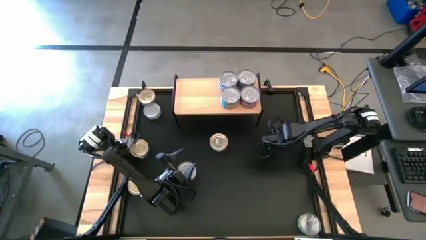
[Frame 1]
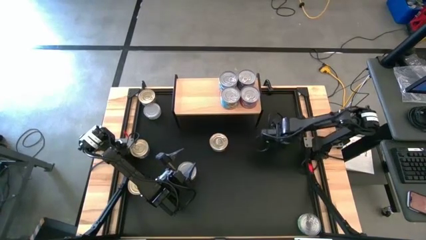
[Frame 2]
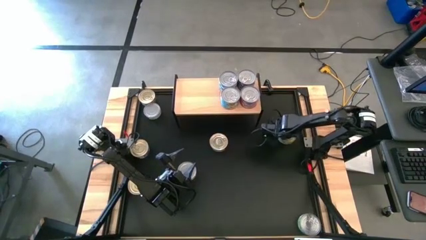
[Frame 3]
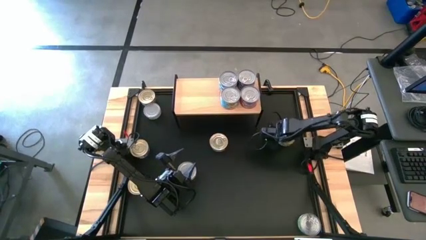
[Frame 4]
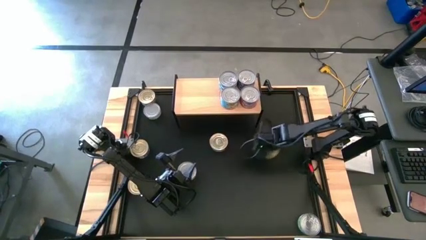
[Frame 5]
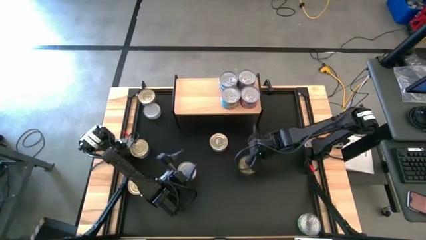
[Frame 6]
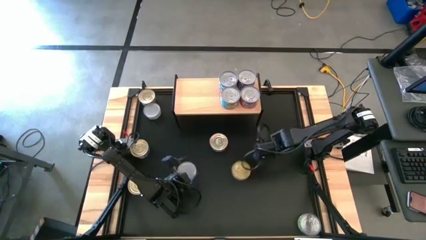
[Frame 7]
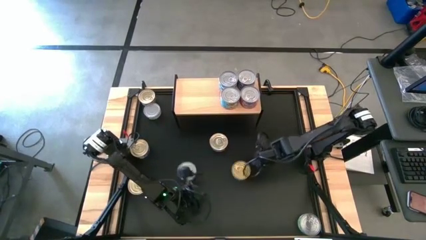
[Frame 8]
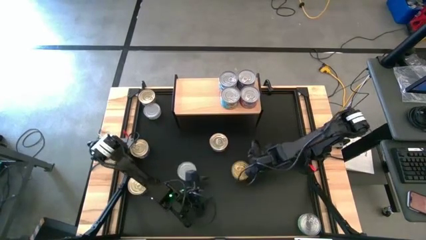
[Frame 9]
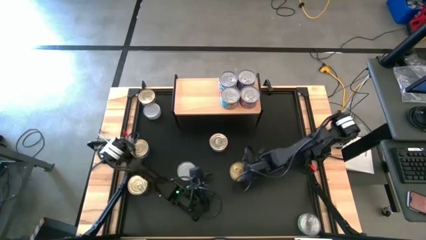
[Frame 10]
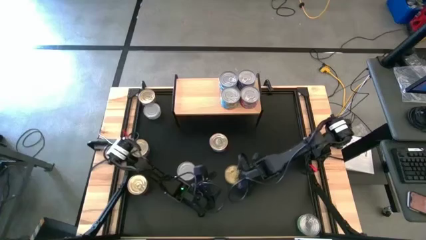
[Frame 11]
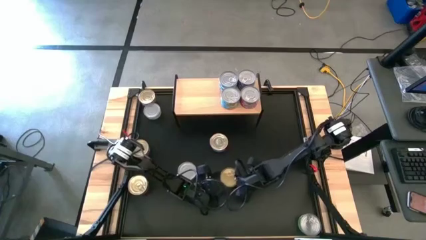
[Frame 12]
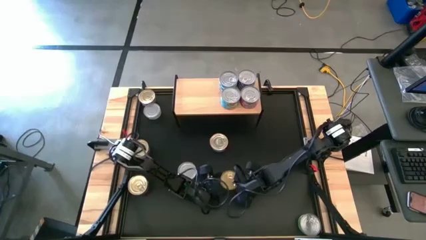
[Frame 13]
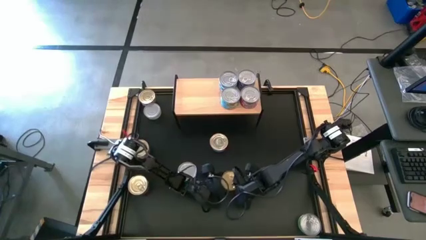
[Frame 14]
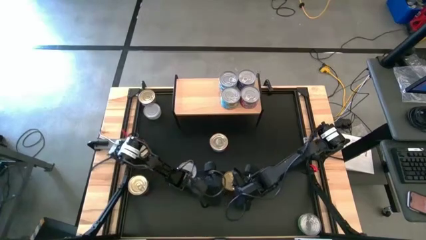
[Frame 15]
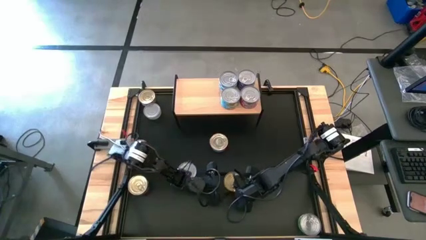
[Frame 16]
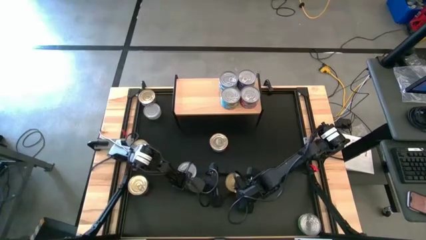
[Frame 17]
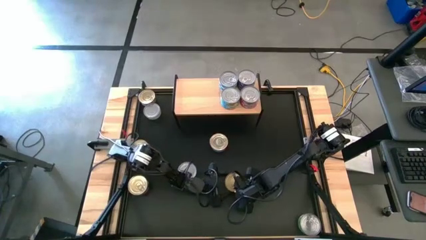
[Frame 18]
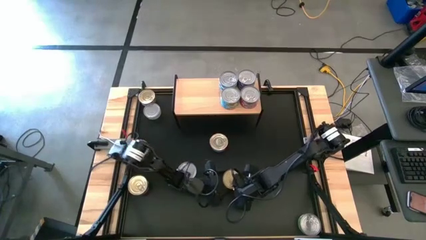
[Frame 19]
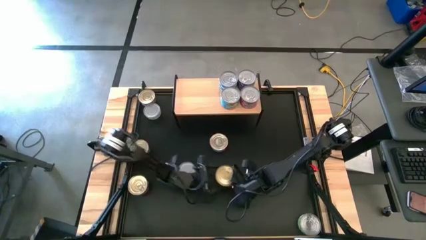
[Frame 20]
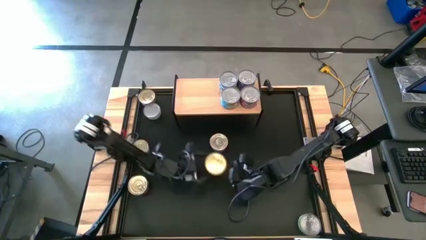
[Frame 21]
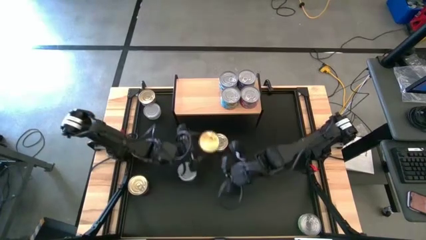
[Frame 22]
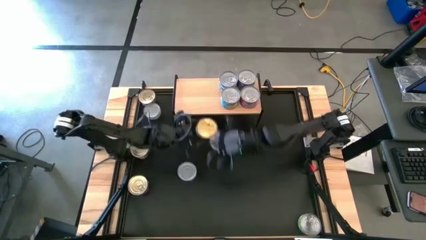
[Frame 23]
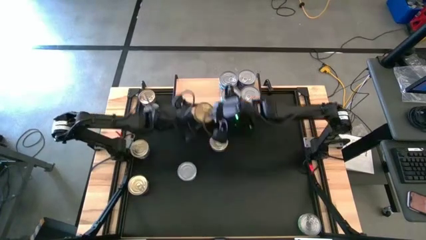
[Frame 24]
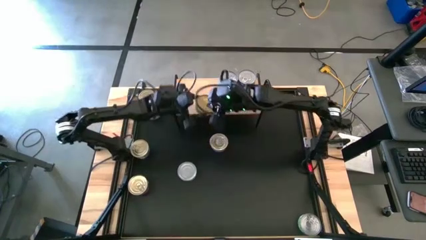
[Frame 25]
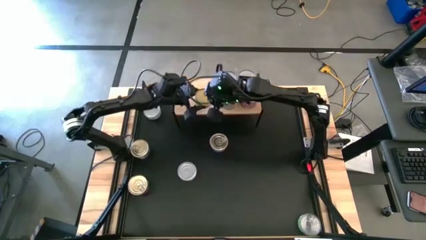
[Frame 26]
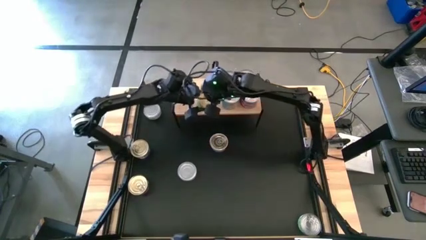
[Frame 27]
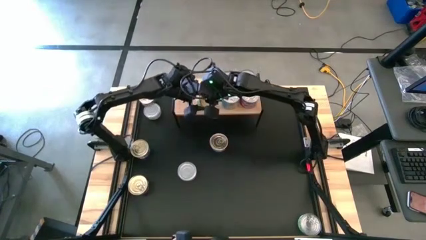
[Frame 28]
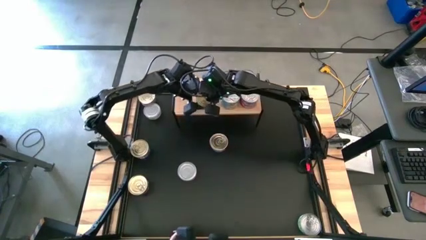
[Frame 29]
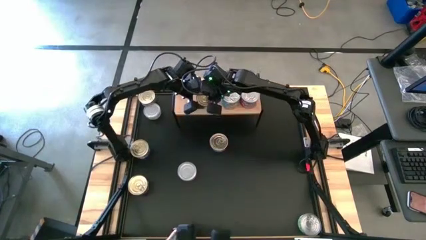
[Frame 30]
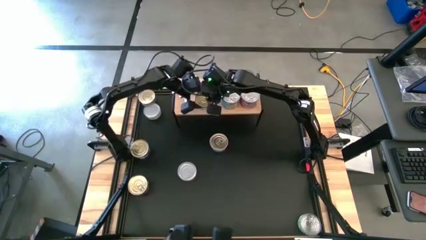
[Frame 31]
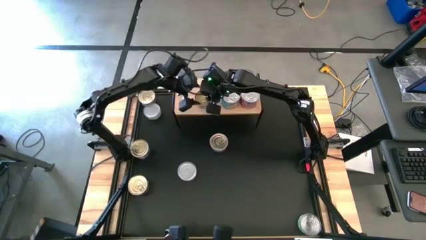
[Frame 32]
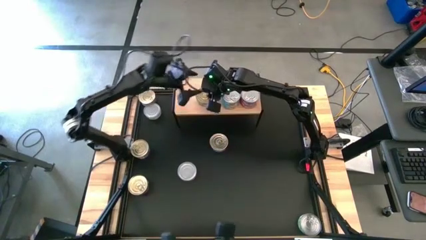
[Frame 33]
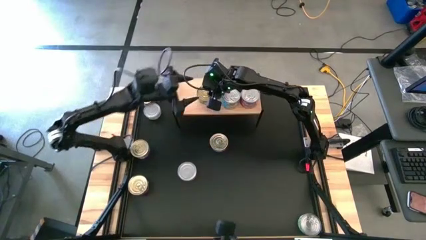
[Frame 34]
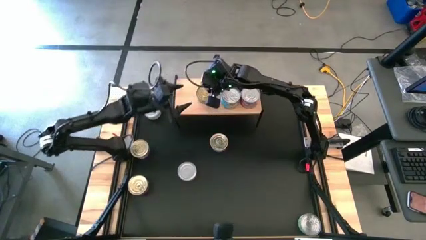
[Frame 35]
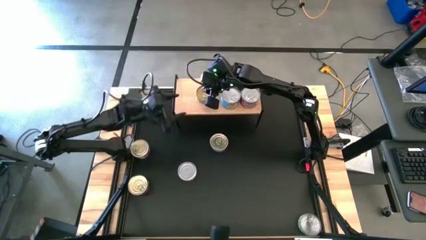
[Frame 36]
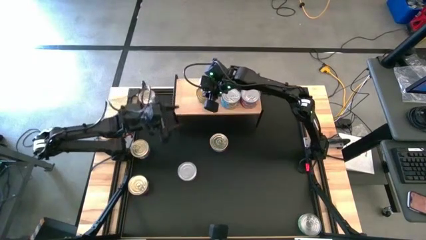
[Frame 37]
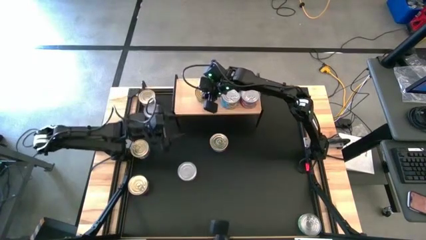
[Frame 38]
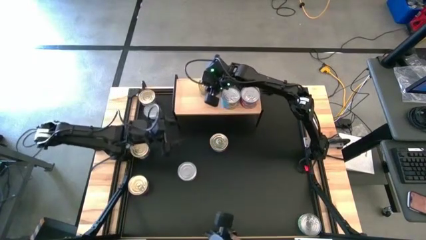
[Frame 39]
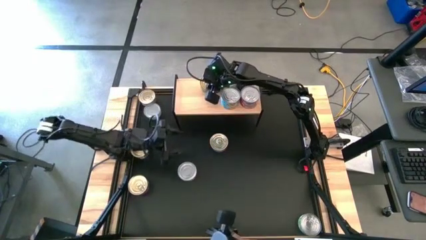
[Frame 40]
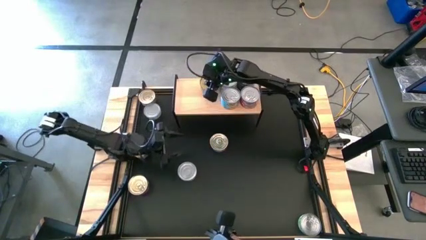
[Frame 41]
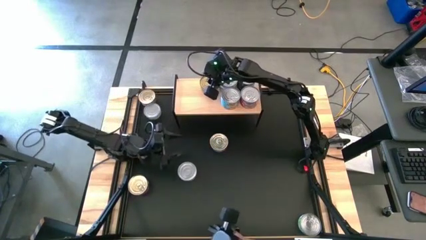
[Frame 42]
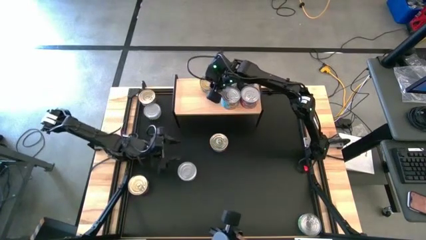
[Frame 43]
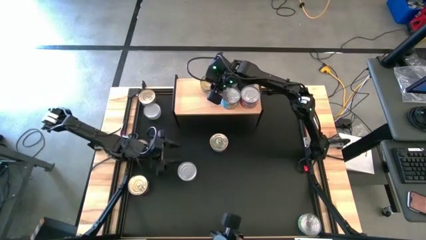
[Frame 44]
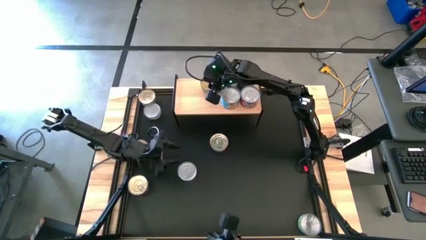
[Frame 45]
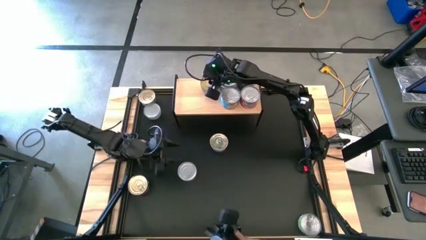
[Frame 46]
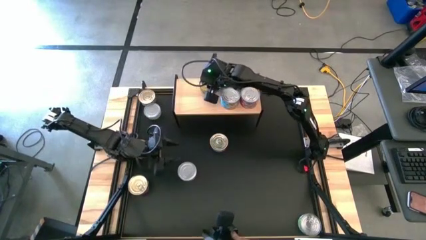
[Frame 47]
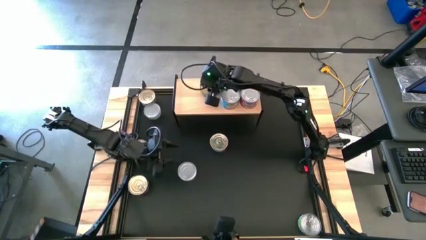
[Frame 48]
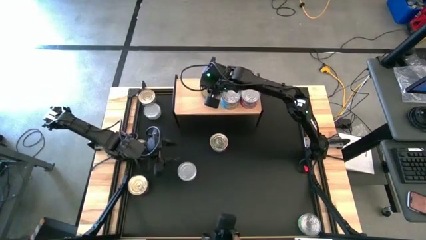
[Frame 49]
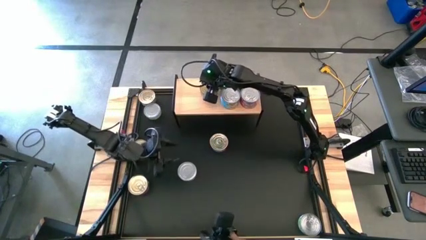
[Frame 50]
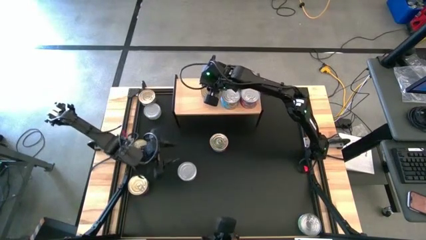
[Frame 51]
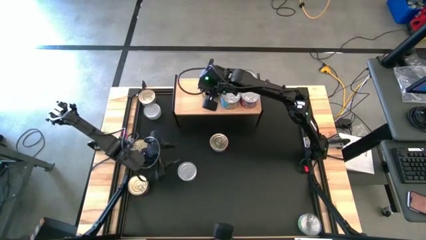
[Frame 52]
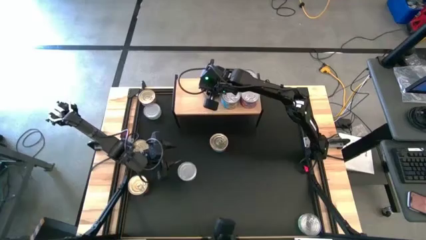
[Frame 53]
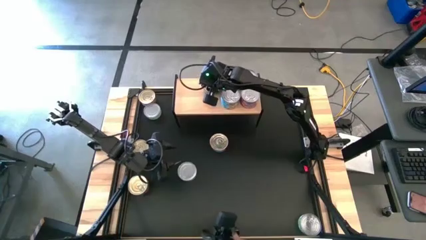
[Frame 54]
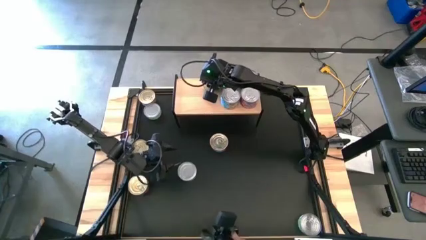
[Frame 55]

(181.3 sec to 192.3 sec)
Task: Stack canned seafood by type on shelf
Put the green tuna can on the shelf

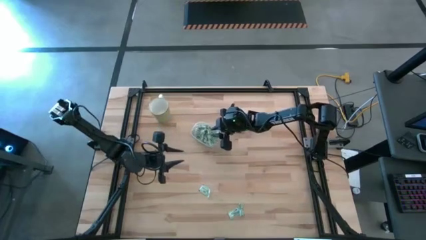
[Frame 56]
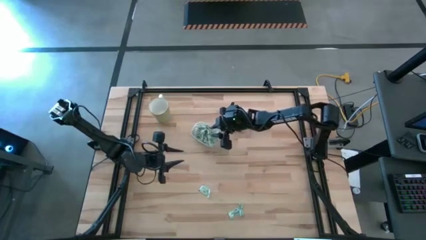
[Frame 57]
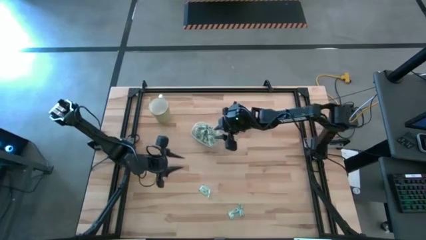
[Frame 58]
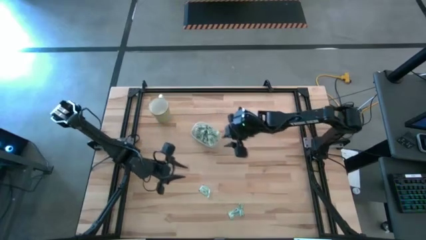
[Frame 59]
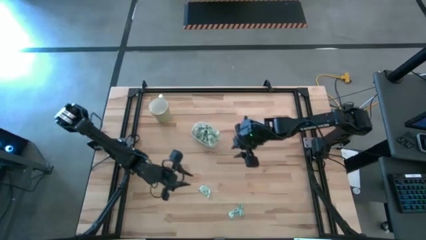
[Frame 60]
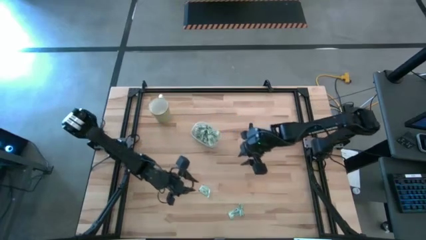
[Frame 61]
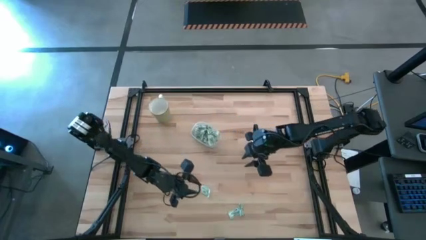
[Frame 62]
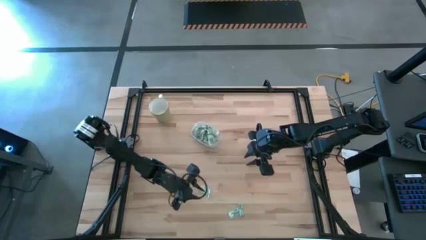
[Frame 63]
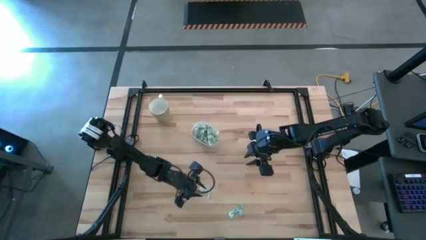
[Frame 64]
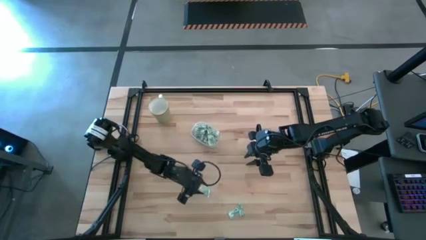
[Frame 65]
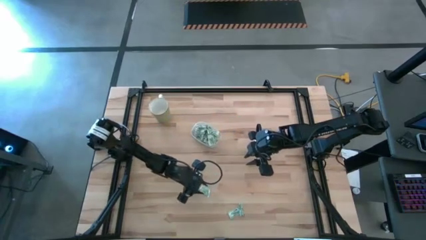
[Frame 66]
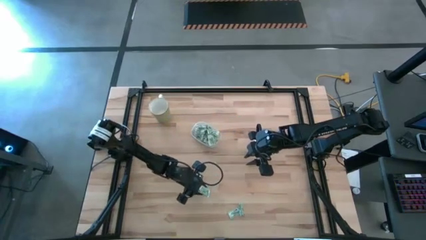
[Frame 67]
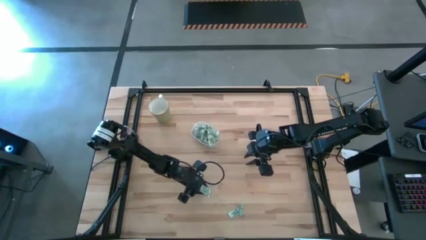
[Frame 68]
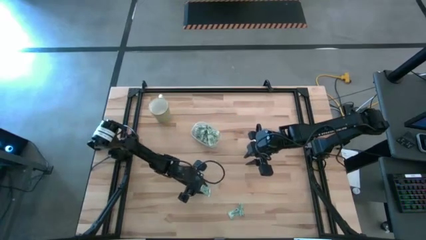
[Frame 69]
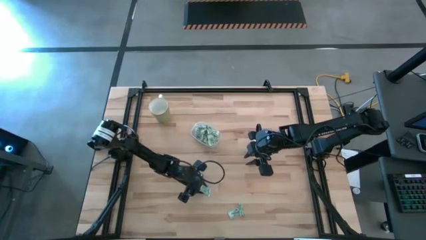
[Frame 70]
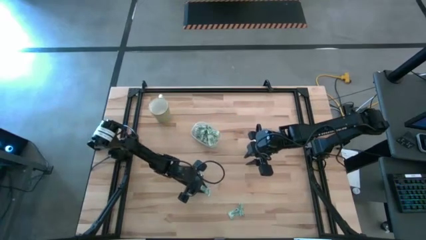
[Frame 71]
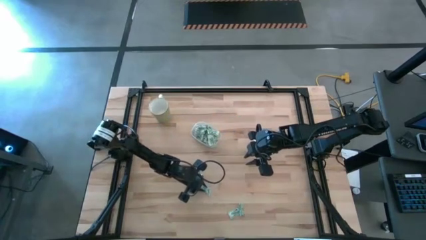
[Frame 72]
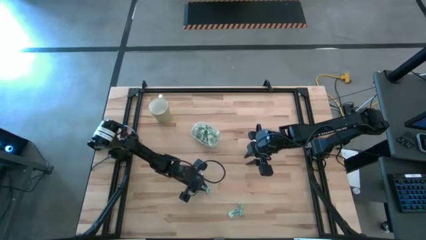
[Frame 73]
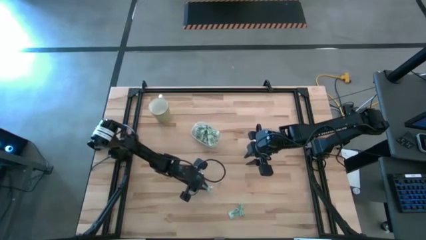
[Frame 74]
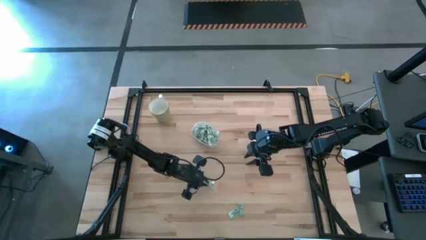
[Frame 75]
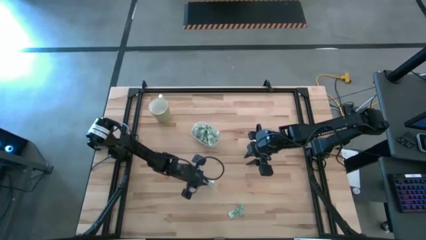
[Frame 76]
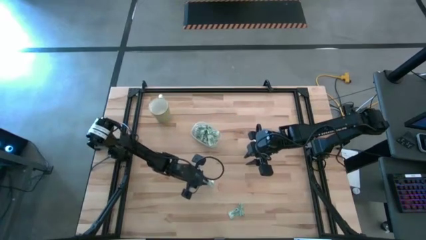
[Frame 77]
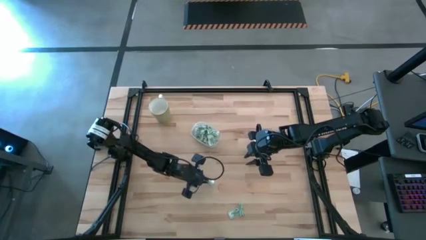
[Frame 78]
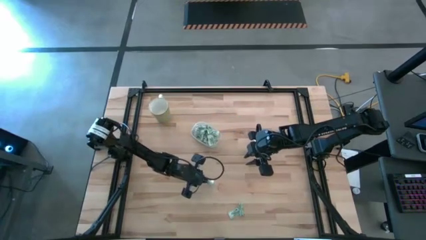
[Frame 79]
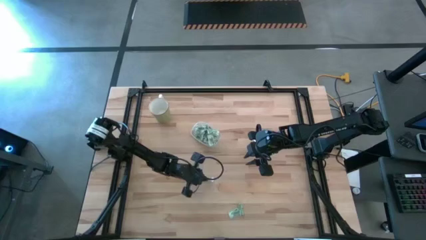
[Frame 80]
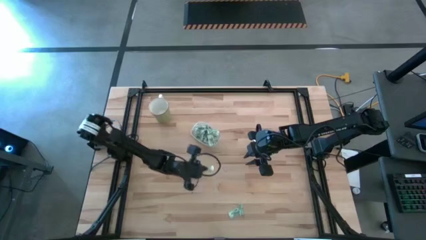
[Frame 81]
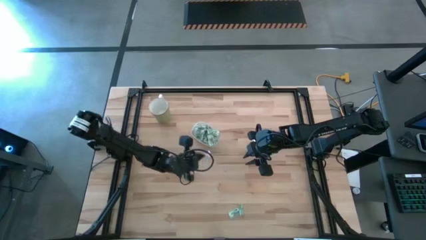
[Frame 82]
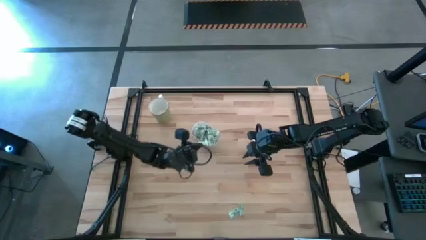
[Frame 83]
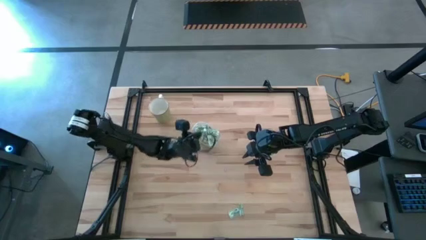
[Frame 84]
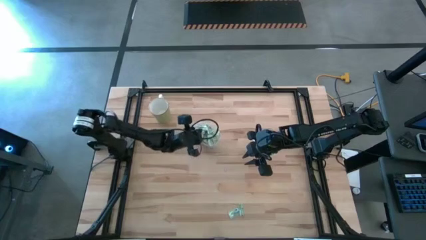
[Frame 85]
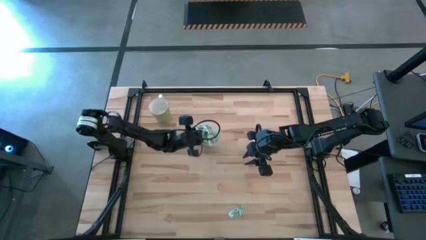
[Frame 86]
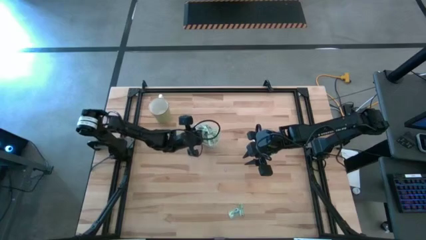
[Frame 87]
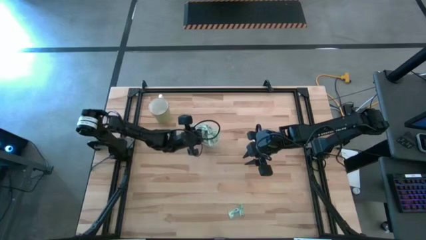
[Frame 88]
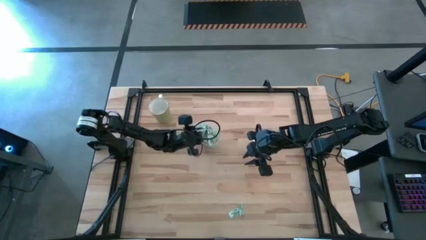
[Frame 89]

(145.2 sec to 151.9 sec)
Task: Pick and place Stevia / Truvia into bins
Put the top stevia packet into the transparent container
